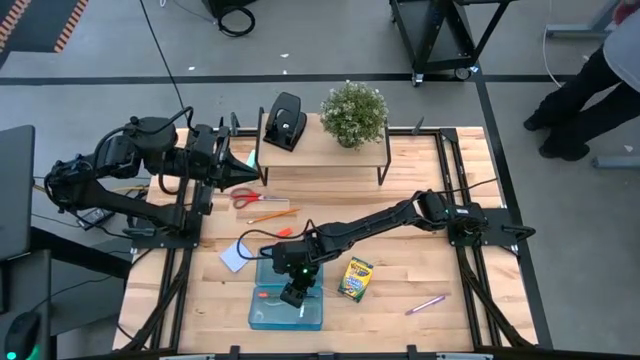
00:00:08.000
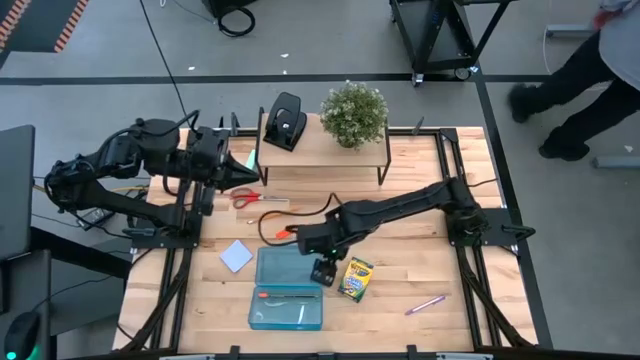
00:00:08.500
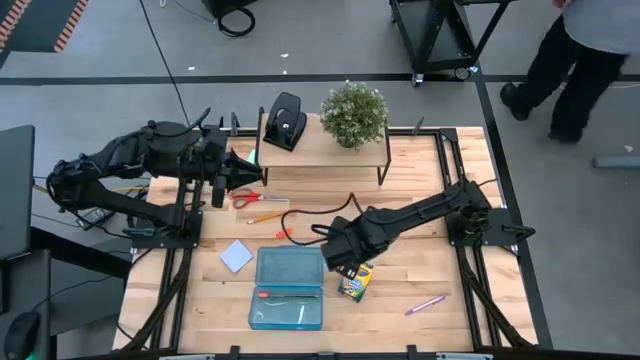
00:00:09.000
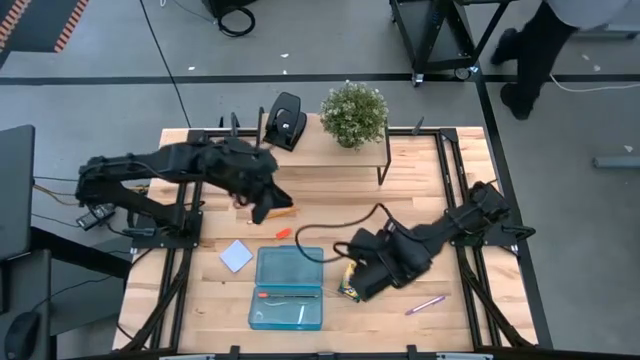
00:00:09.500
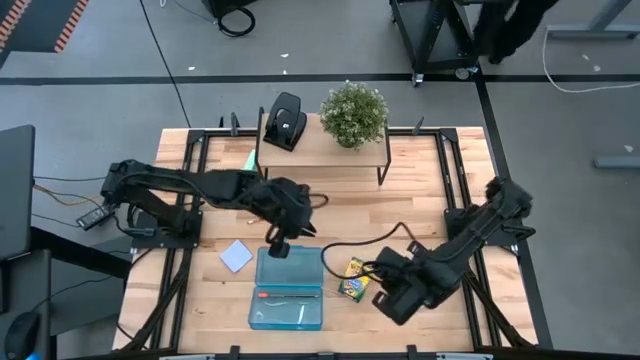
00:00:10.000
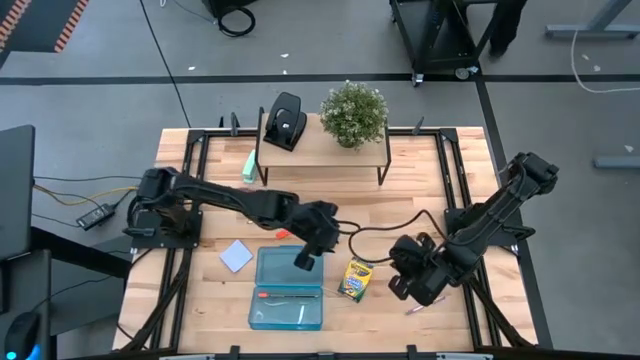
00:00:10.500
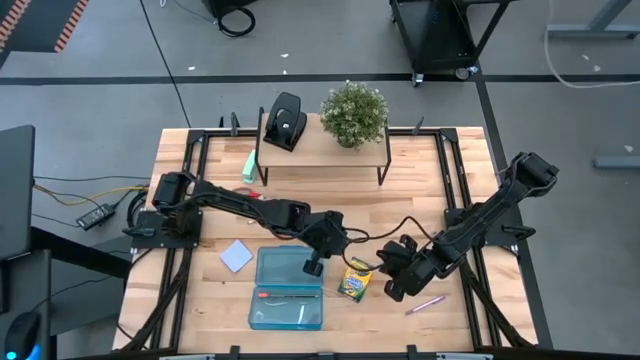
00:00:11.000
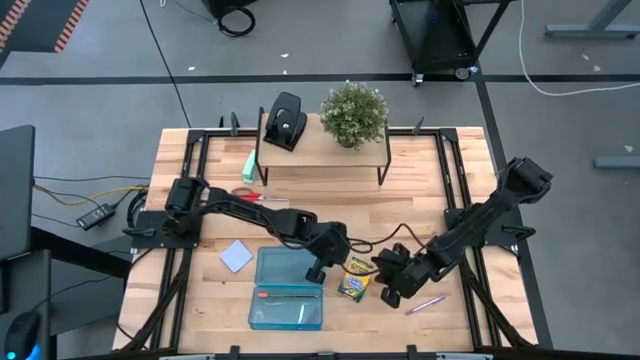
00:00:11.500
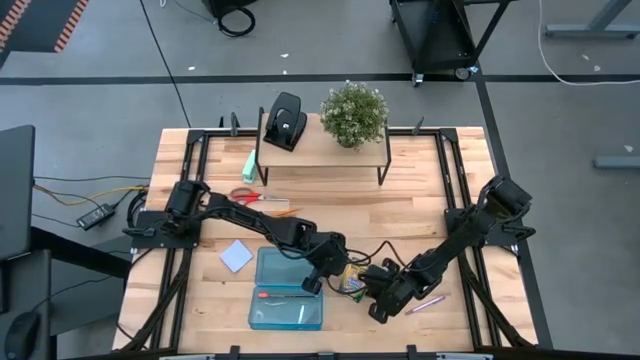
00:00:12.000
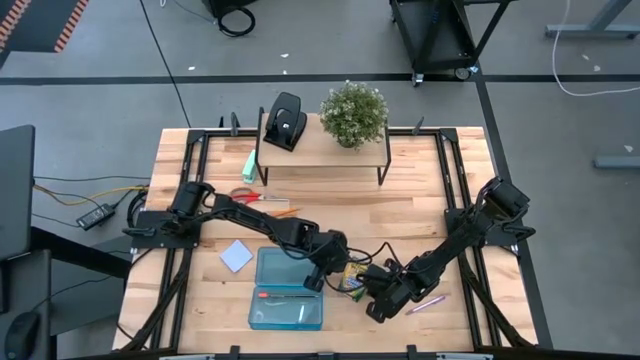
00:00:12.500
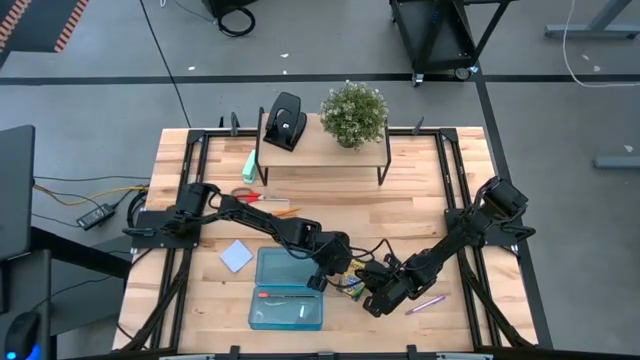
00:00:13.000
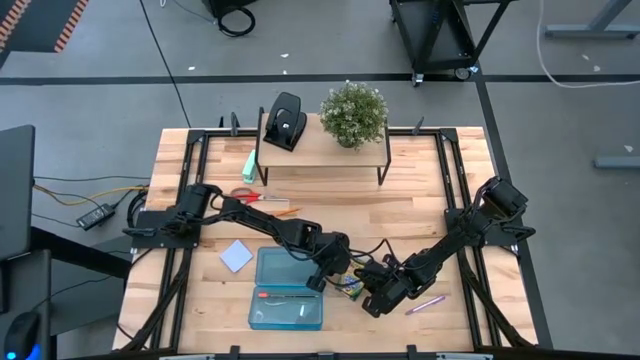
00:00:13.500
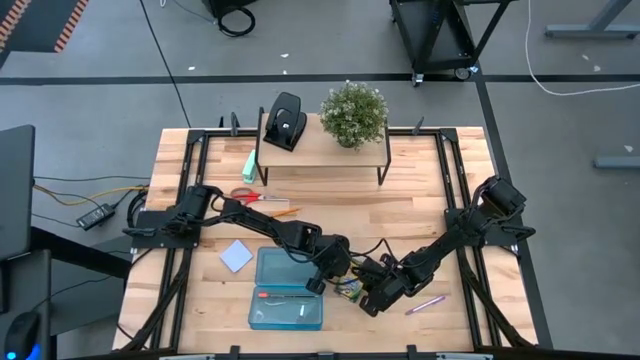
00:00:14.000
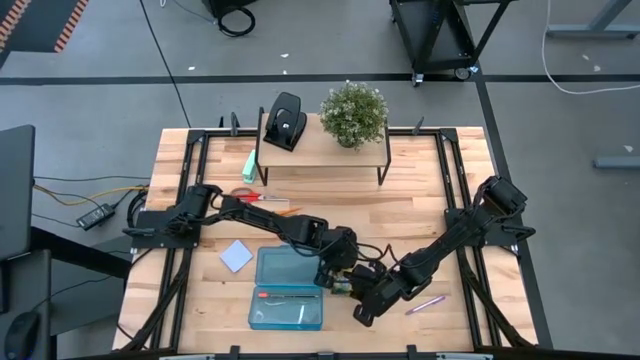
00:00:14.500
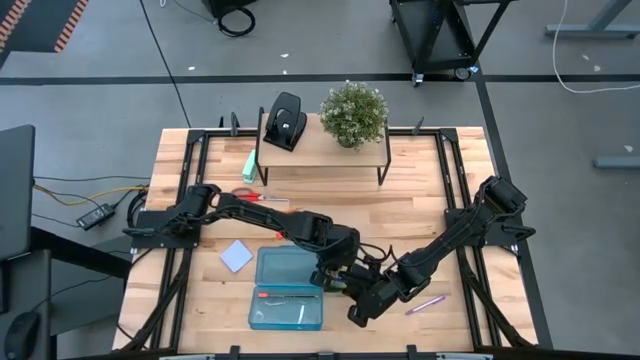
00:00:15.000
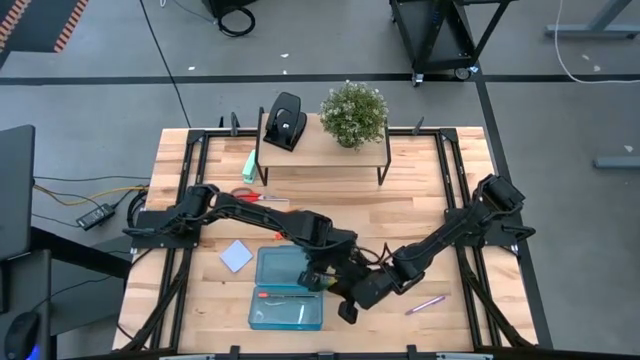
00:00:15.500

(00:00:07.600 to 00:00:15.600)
Task: Pack school essentials
Put the yellow crayon box into the blue supply box

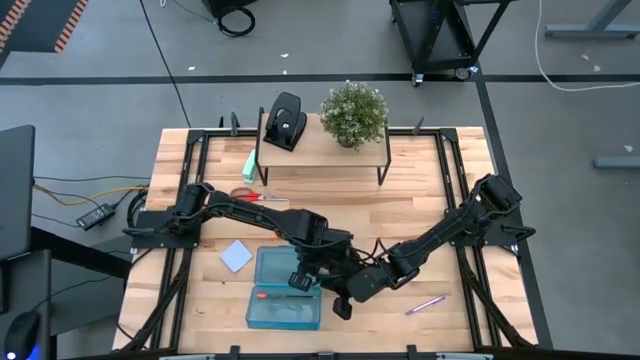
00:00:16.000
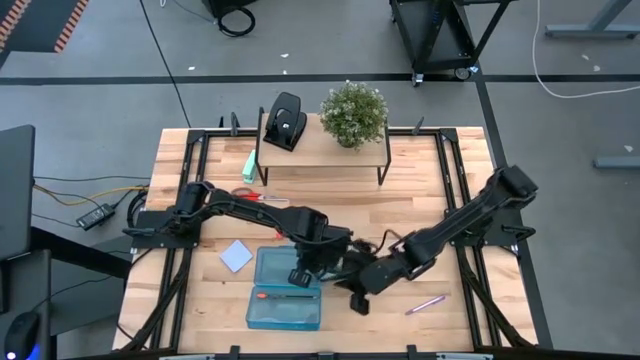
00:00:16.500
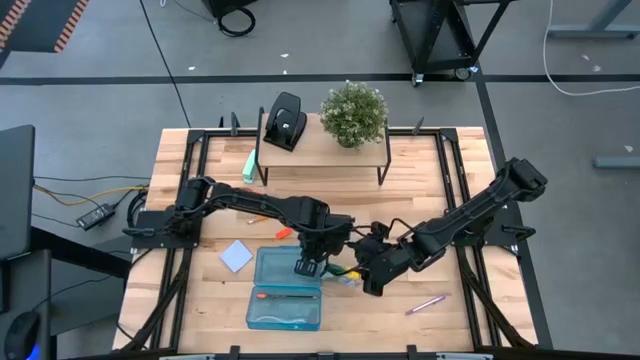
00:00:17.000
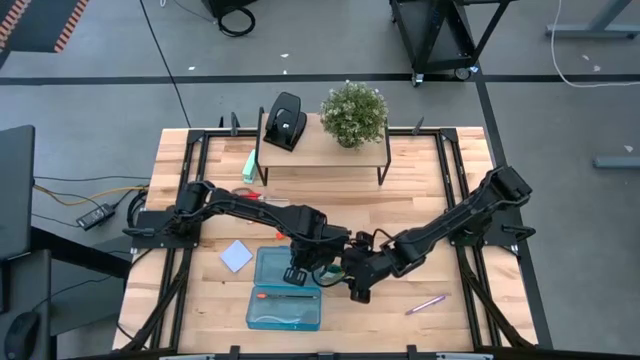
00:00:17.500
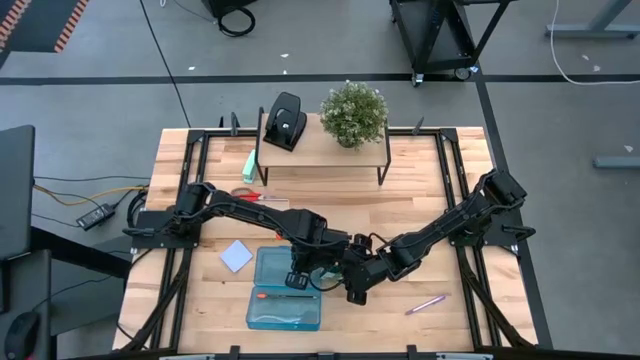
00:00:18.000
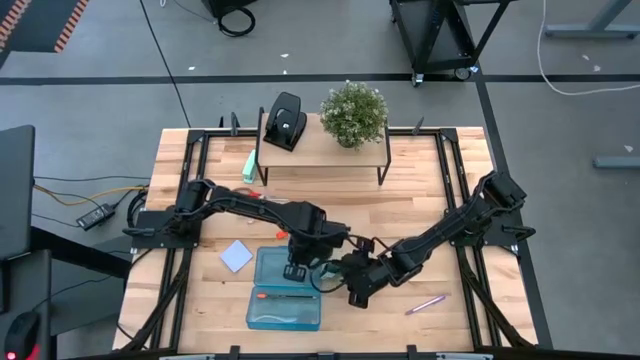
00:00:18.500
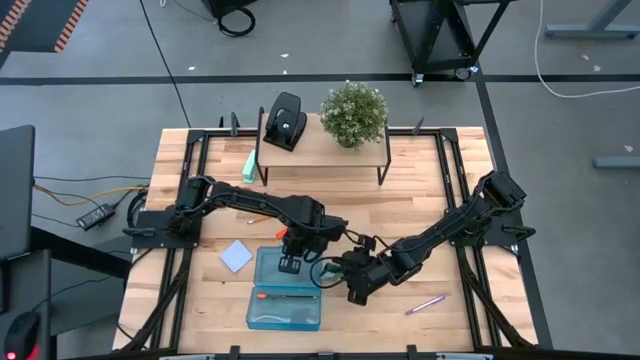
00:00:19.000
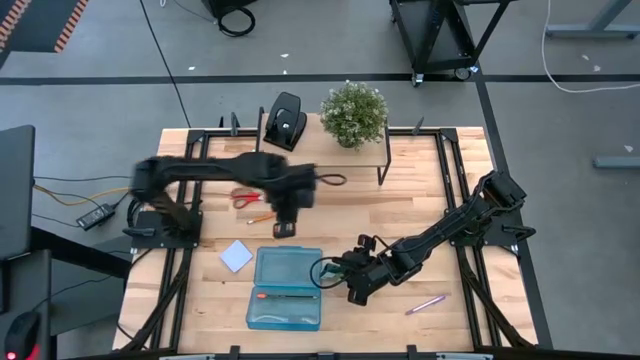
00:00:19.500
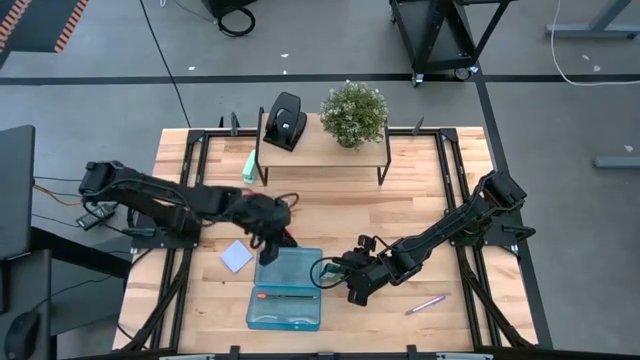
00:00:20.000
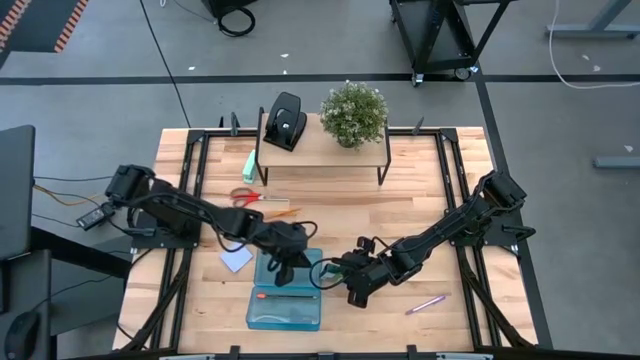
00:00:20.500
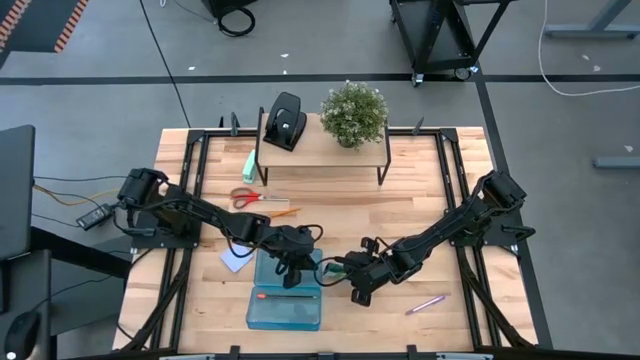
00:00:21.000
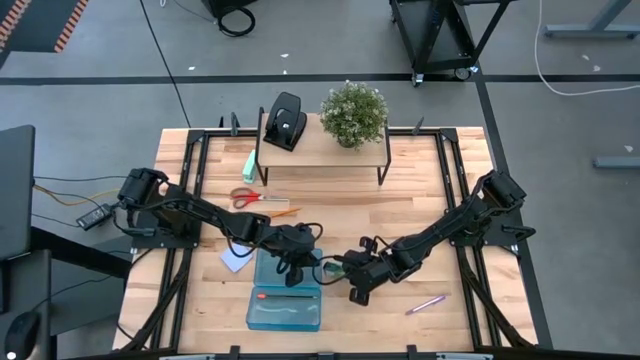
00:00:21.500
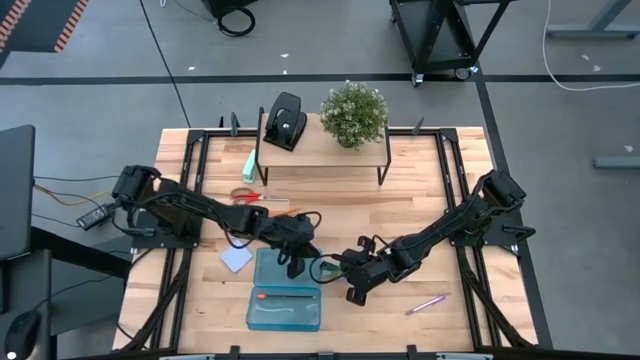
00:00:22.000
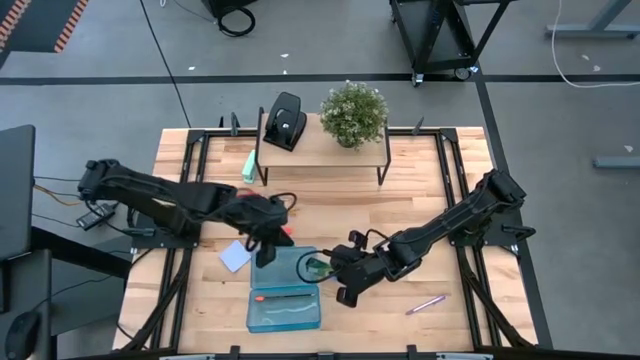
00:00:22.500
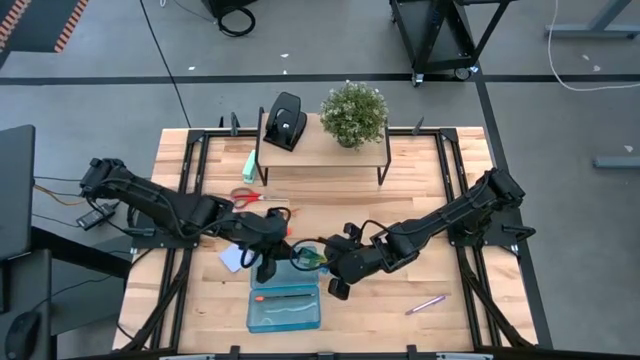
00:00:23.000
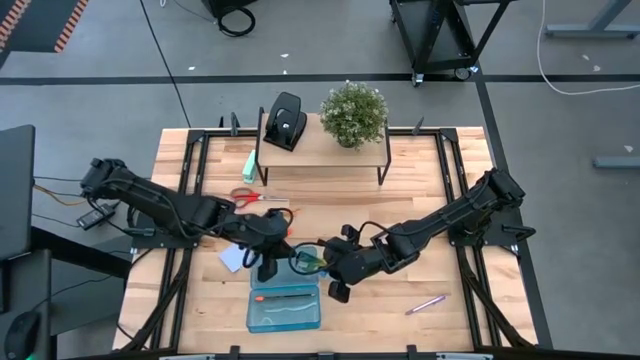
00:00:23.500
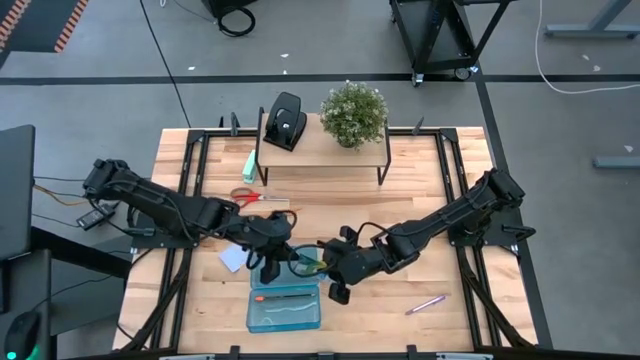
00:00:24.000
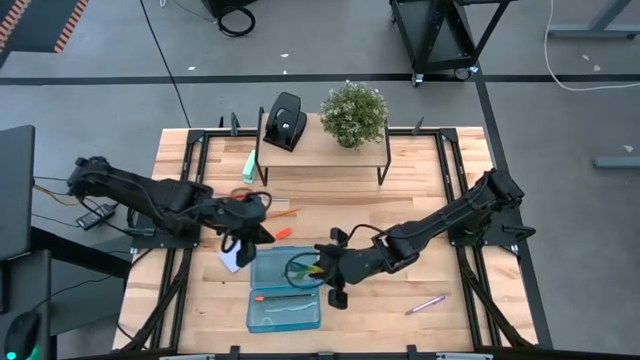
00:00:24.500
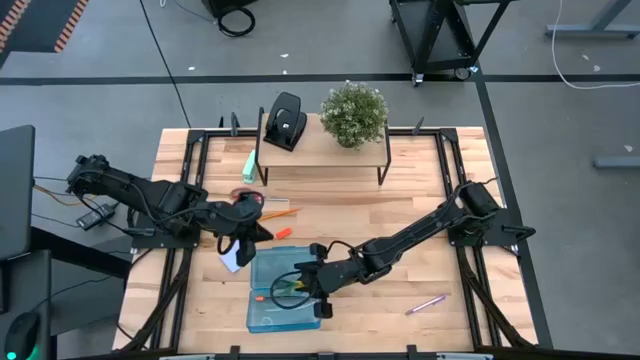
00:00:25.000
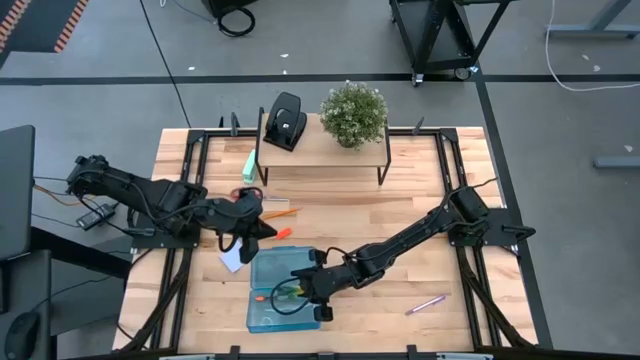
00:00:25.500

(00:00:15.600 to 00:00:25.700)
Put the yellow crayon box into the blue supply box

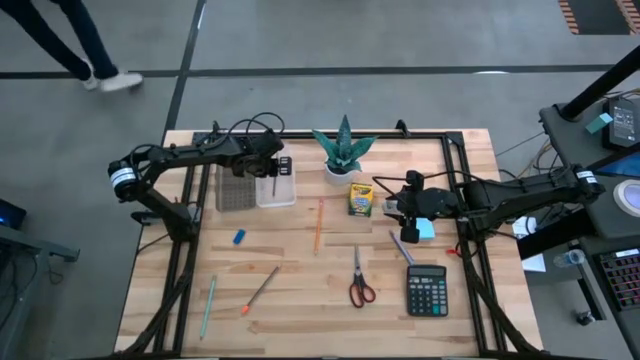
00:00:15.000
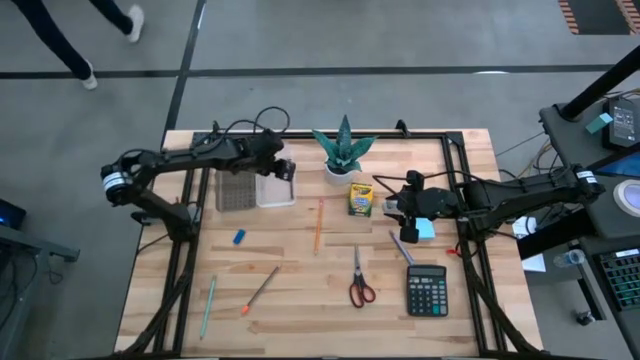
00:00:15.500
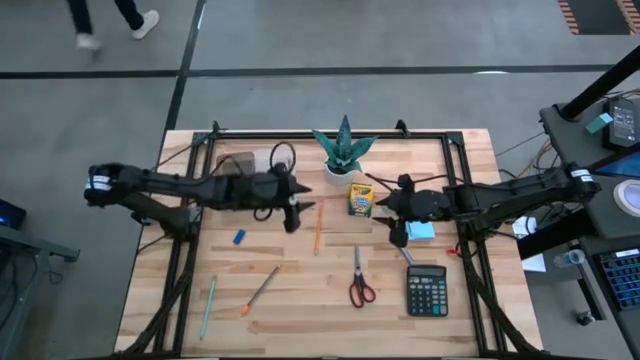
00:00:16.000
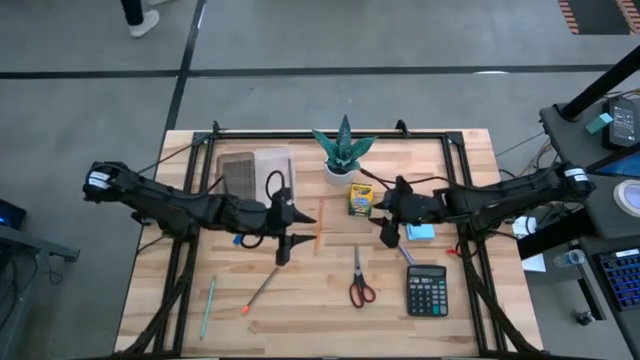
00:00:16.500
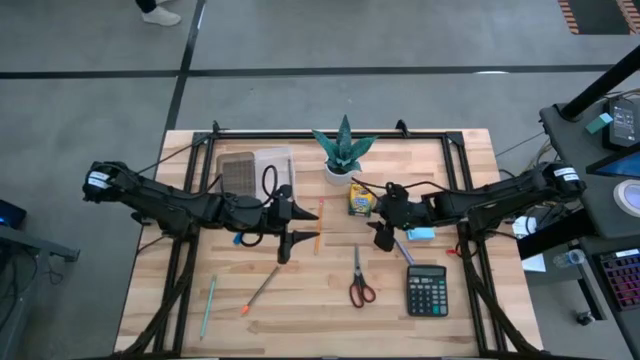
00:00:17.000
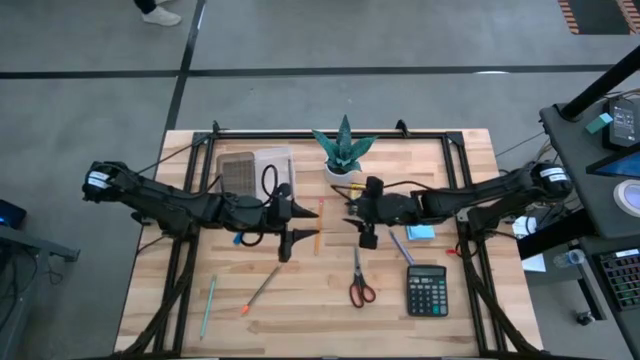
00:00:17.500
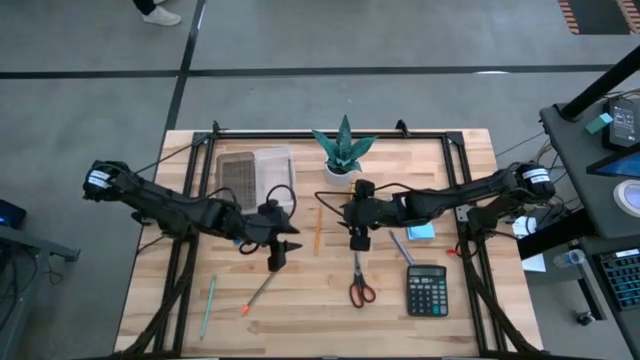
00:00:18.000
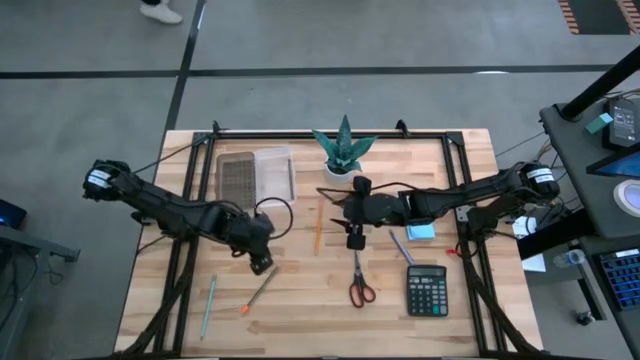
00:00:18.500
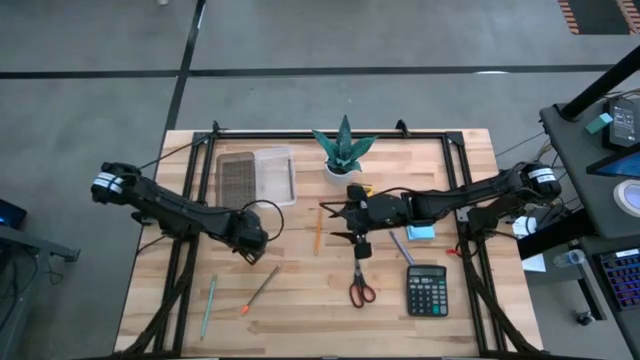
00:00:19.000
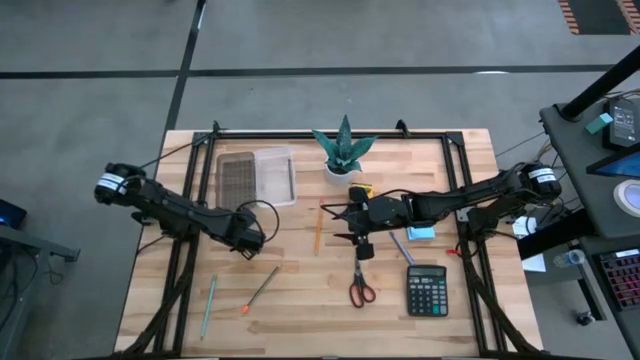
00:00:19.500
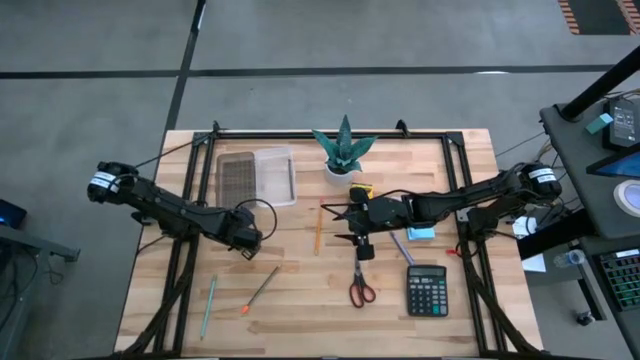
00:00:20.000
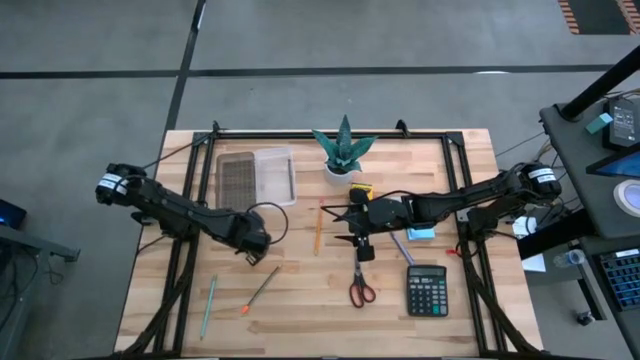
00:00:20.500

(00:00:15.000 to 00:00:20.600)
Task: Pack school essentials
Put the blue eraser into the black supply box
